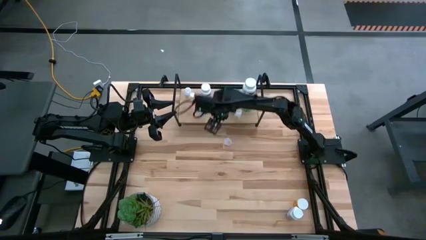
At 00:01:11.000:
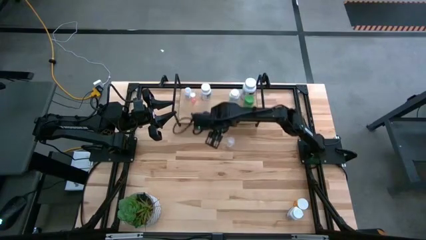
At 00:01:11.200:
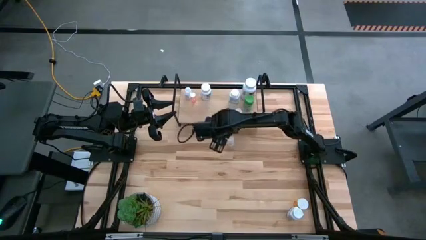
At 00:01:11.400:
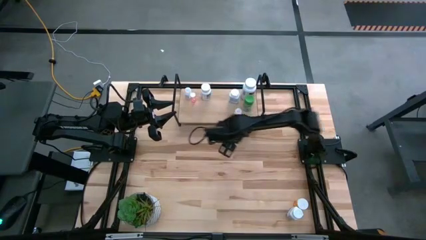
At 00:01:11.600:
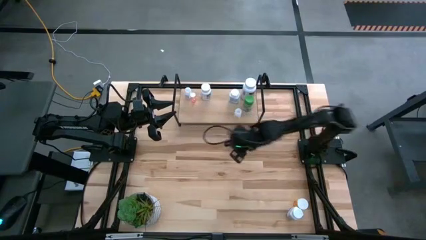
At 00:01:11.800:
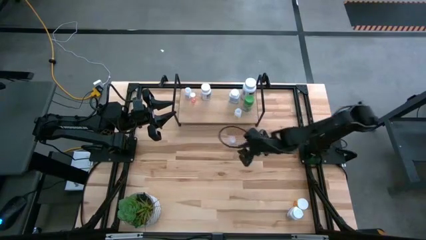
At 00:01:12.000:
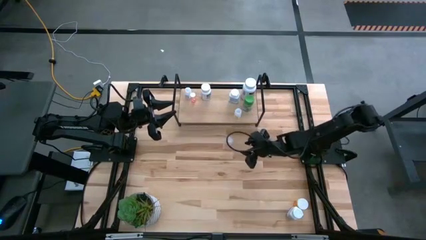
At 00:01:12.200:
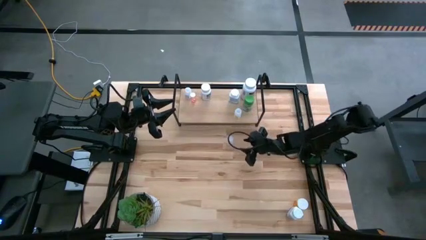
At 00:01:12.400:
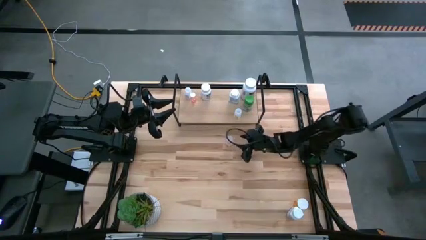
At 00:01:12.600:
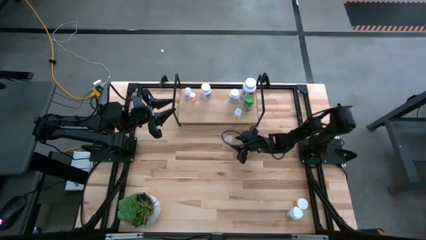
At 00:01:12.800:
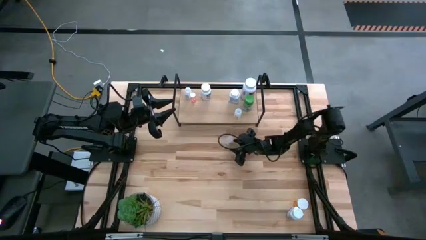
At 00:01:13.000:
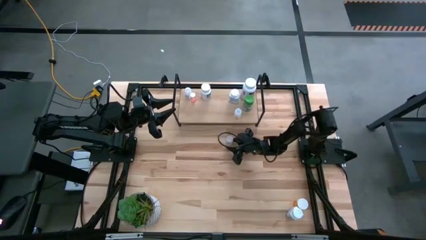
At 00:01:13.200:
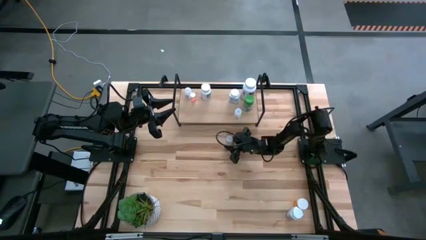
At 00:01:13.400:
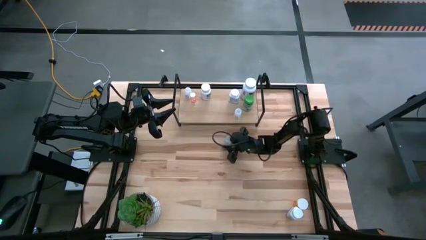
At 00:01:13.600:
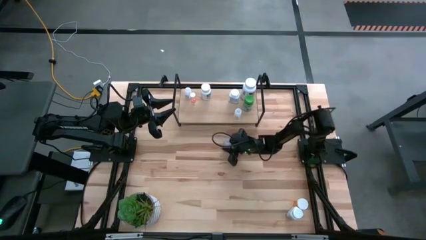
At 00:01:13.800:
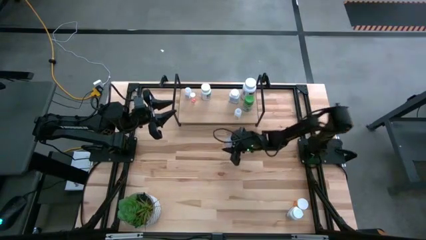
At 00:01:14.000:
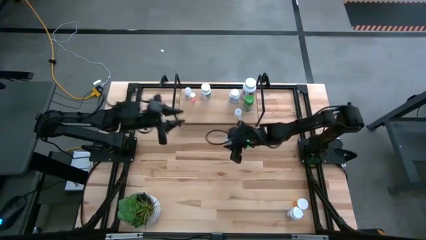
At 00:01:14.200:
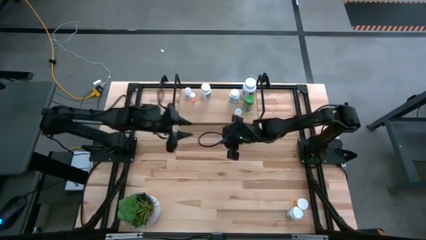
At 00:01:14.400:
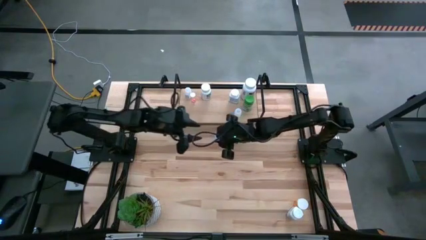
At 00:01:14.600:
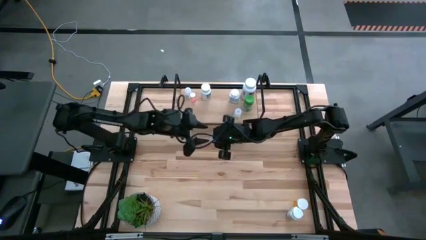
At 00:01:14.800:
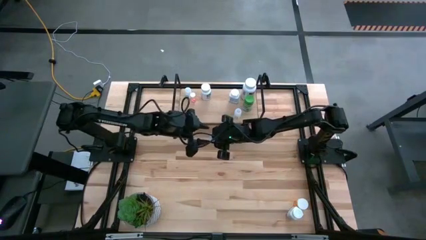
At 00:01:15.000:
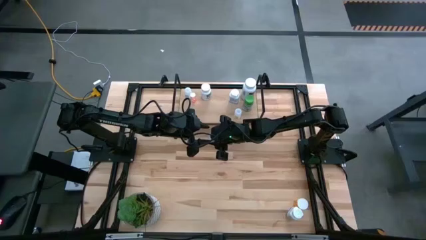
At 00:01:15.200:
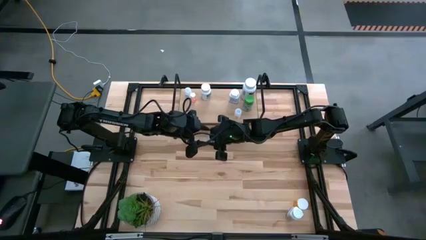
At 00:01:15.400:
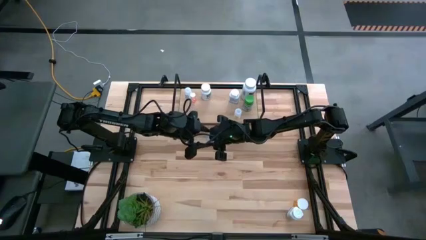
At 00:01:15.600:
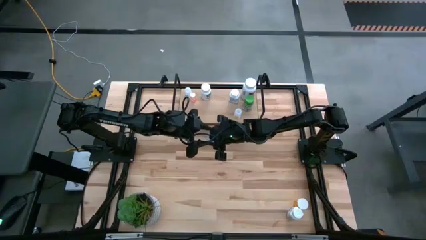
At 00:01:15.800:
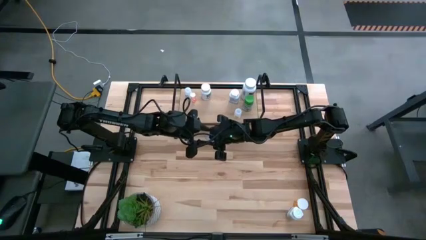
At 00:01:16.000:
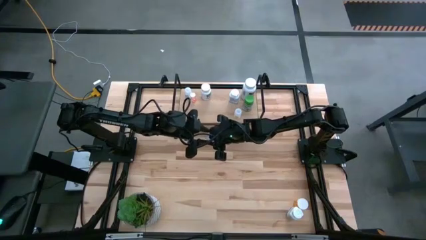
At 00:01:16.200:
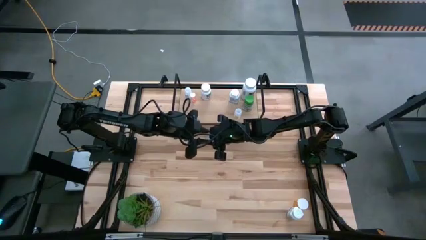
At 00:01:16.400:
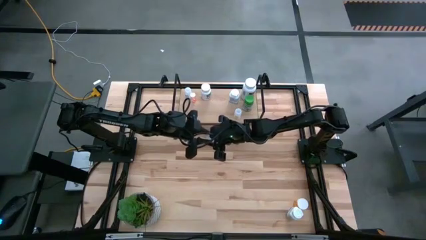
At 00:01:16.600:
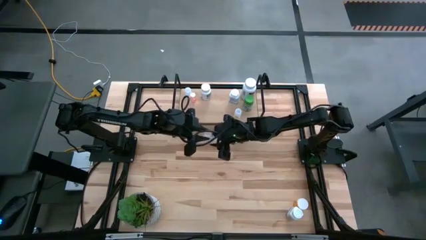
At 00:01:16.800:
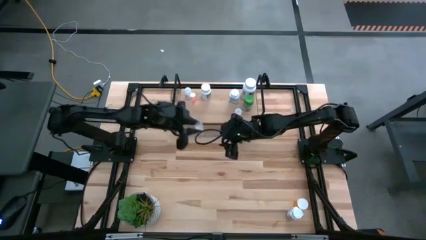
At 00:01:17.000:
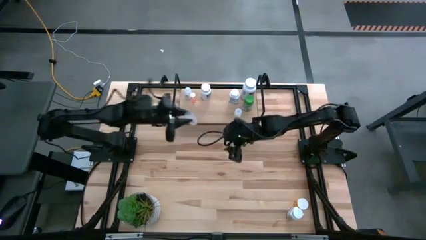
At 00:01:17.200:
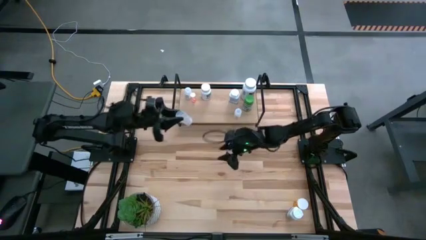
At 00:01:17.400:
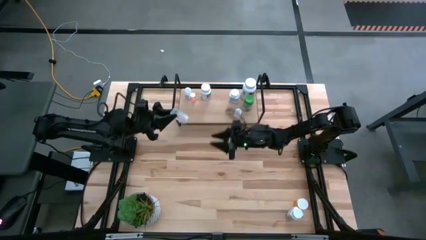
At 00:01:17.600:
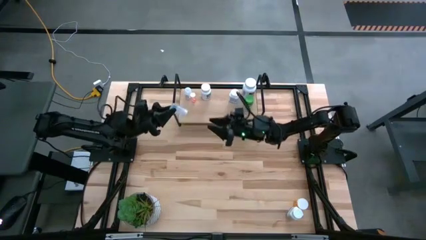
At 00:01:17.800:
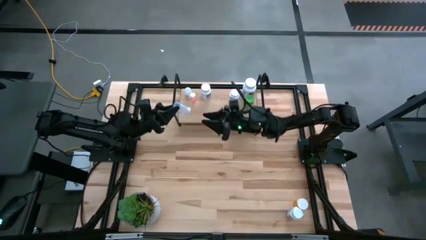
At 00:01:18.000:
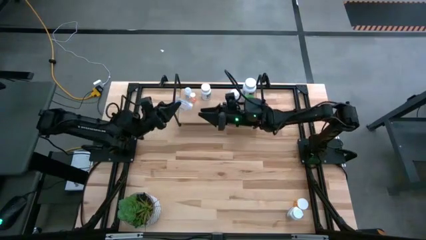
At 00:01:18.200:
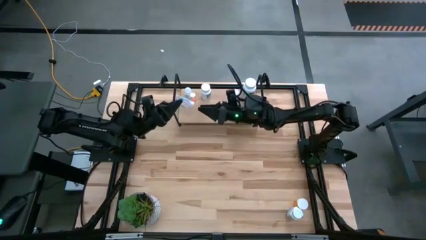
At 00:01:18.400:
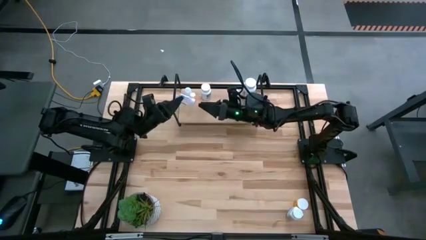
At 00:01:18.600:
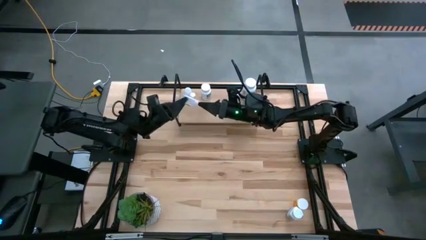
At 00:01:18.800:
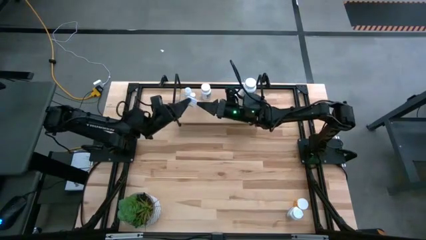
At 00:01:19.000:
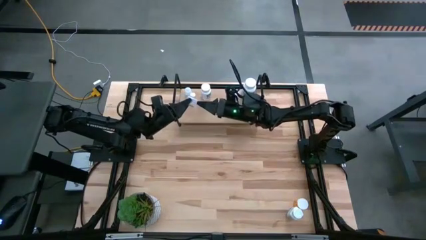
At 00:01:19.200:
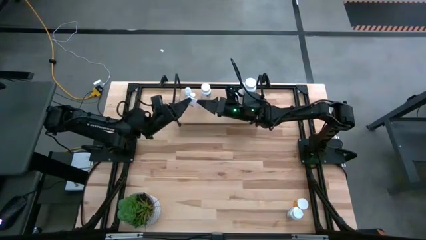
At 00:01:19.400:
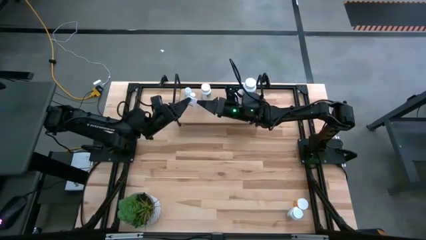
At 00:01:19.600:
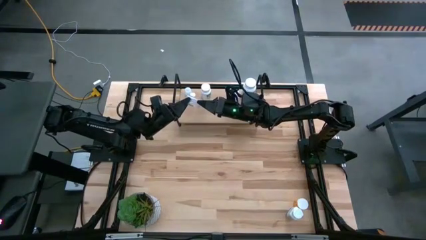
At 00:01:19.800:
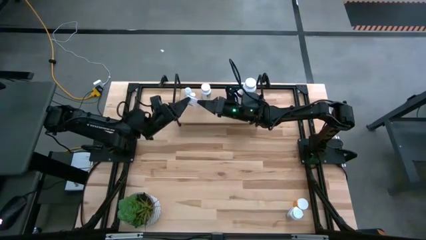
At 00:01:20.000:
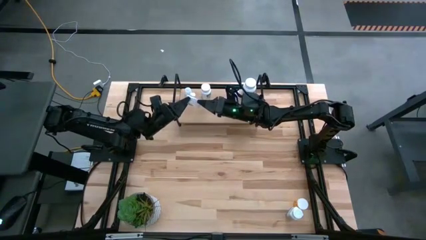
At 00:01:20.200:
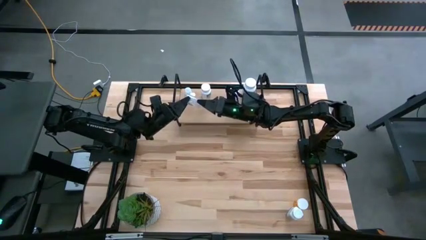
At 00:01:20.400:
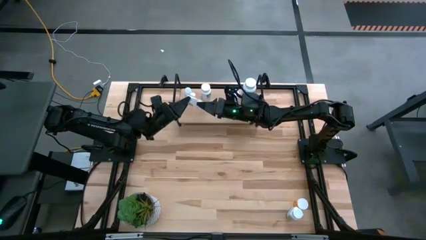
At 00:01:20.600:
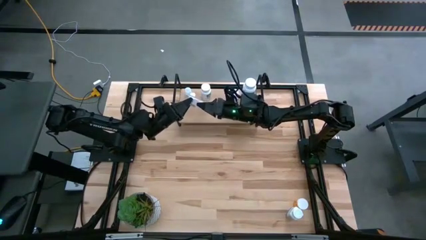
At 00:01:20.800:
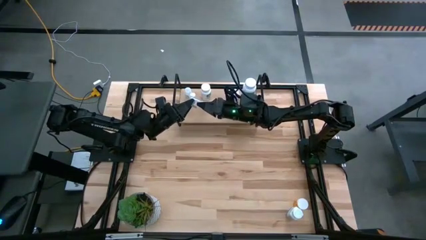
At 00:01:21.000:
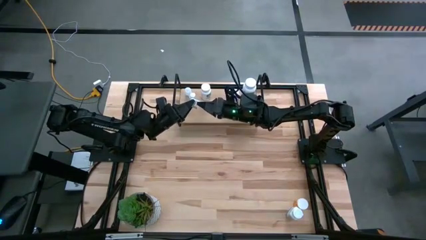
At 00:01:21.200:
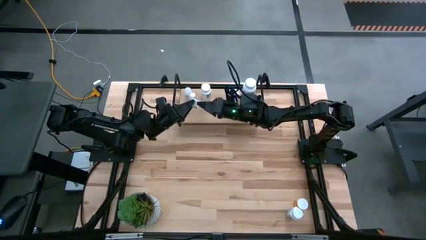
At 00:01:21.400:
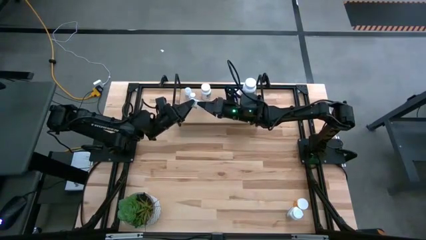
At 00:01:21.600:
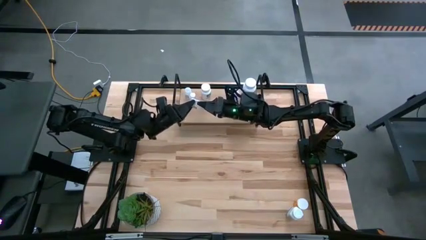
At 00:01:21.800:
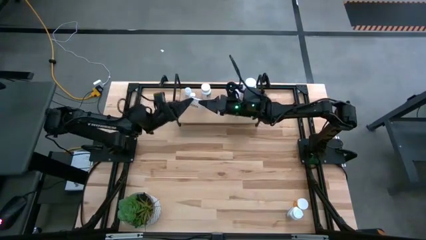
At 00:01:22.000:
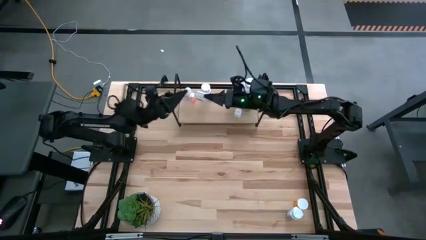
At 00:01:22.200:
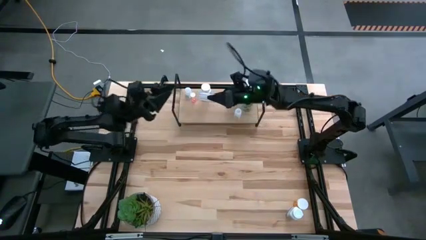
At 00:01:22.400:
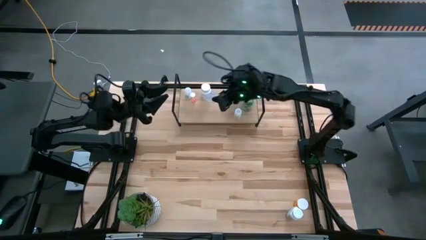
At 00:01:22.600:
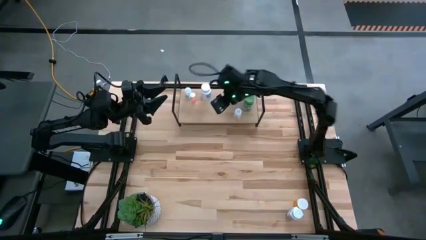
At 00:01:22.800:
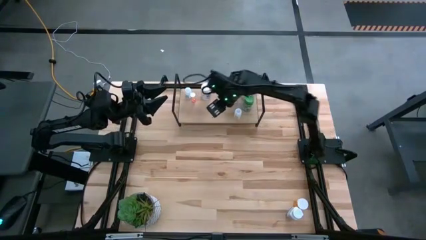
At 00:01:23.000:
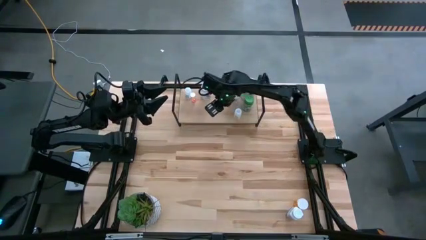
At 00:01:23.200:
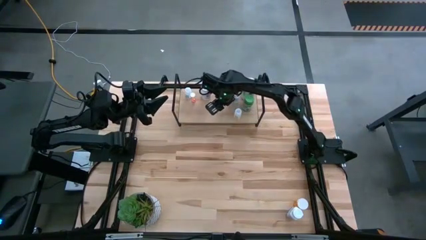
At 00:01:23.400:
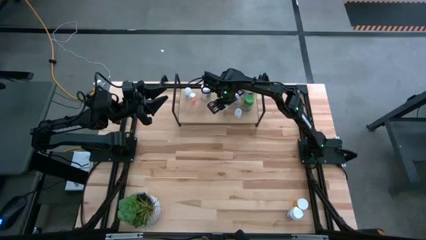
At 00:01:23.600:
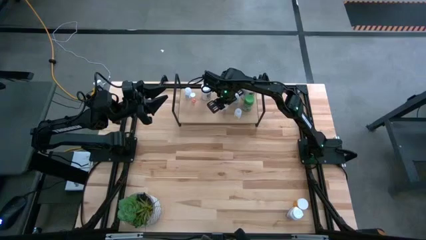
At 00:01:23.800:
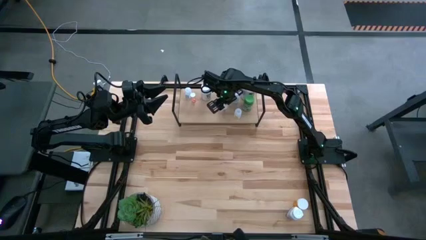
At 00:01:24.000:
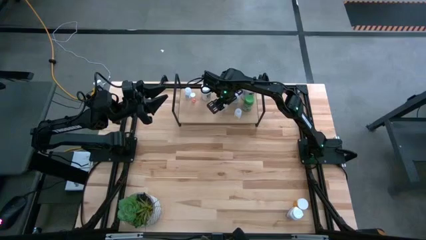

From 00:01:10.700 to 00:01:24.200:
Task: Pick and place medicine bottles onto shelf by color
Put the transparent pill bottle on the shelf
